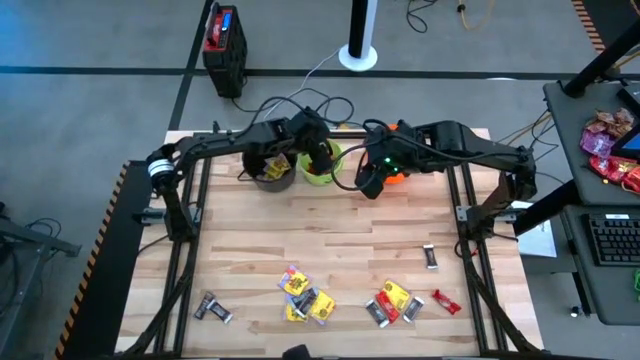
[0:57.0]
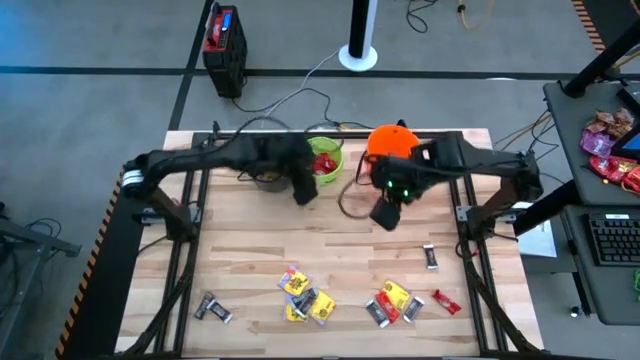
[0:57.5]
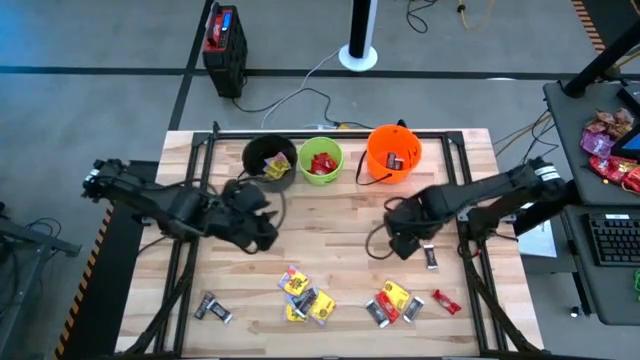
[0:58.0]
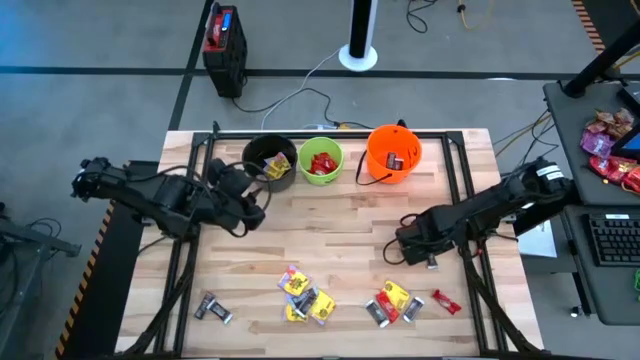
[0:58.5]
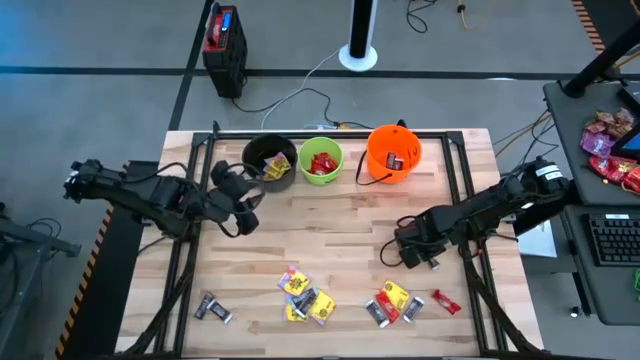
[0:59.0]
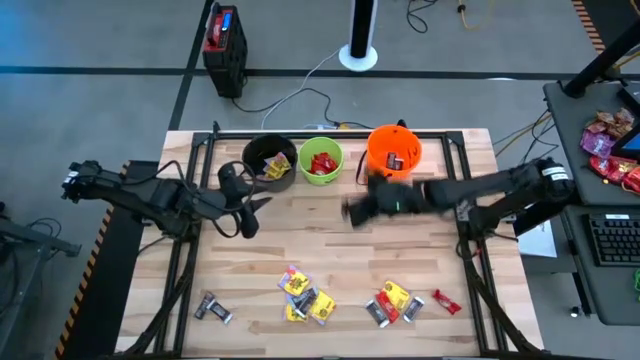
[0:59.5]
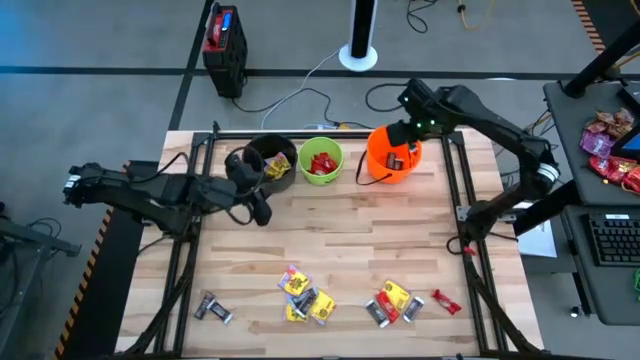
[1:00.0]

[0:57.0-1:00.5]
Task: Sort candy by brand, put in halloween buckets
Put the brown chocolate bar into the orange bucket

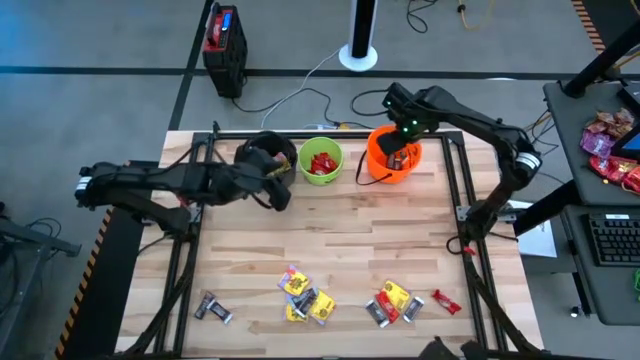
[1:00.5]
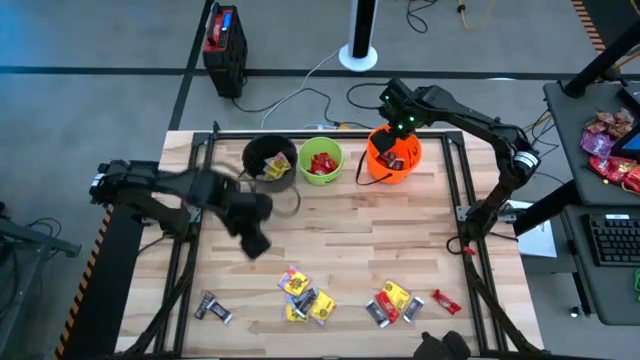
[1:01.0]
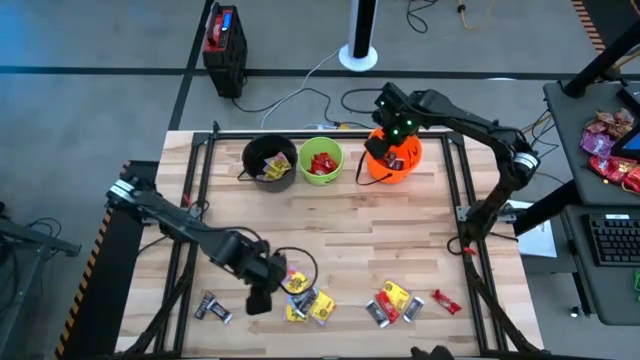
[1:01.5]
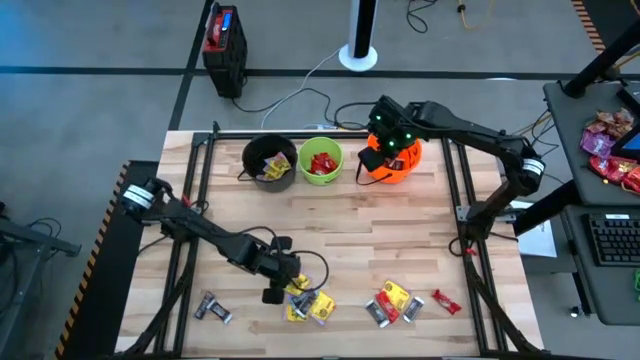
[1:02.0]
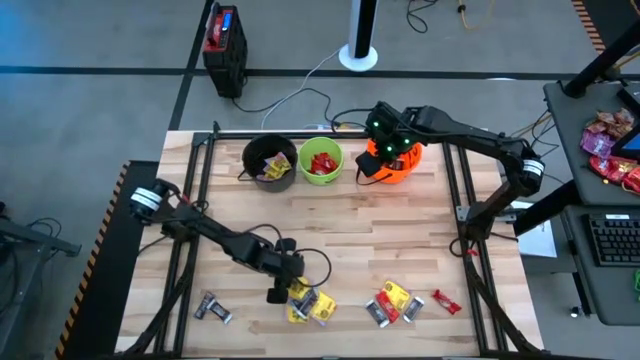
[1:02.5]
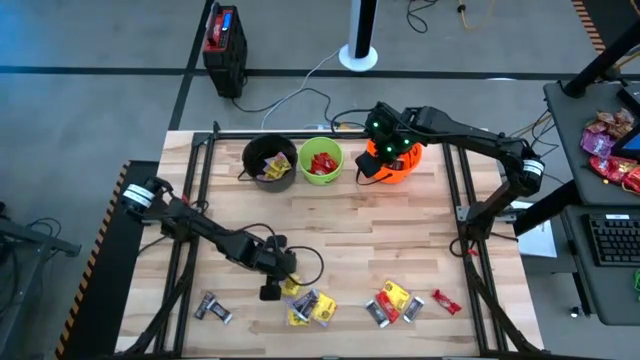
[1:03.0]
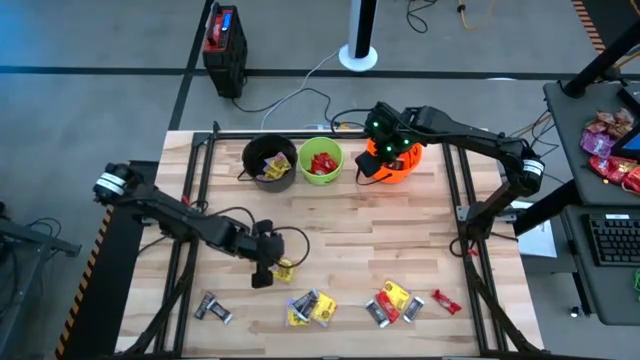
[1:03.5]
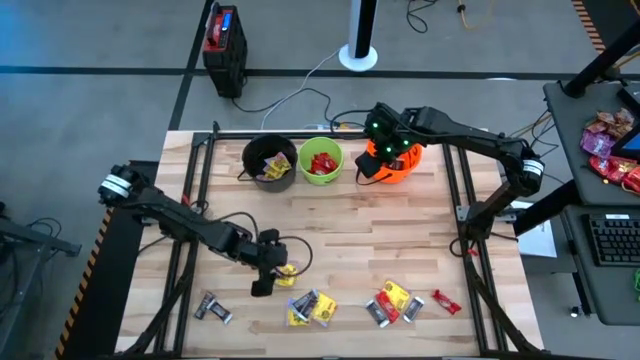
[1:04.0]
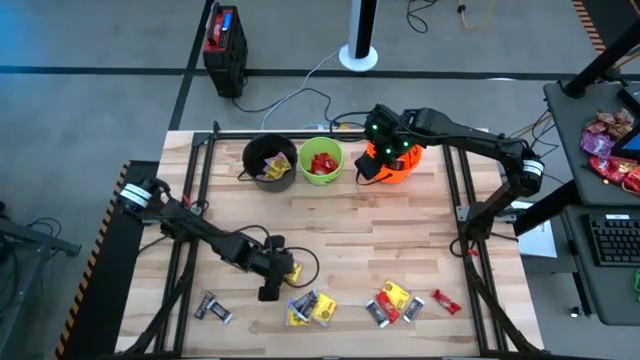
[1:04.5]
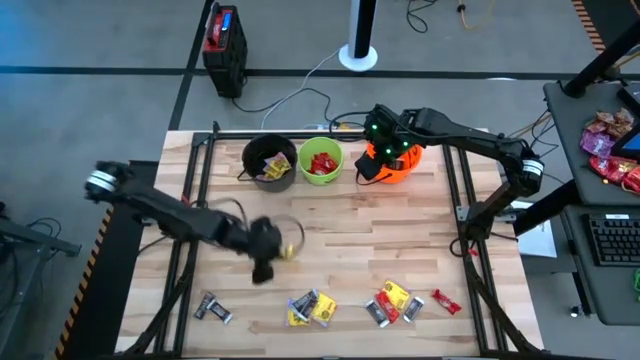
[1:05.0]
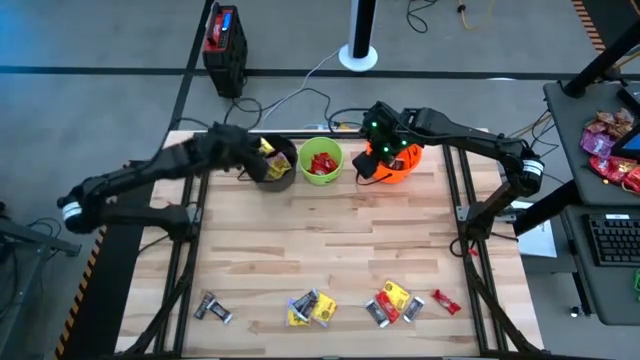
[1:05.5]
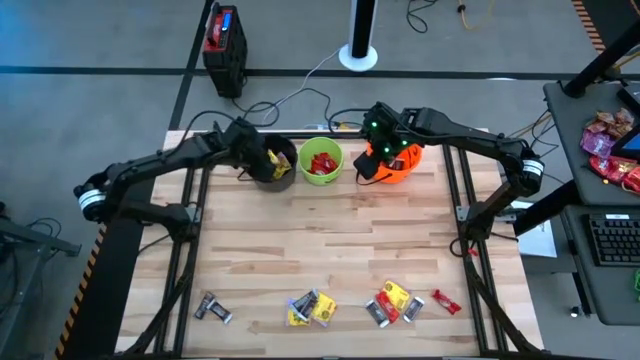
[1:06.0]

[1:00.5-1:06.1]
Put the yellow candy into the black bucket

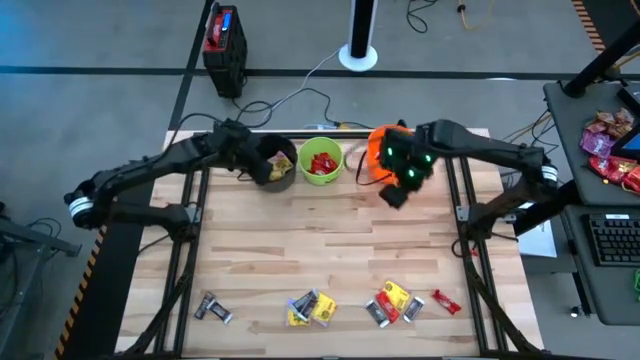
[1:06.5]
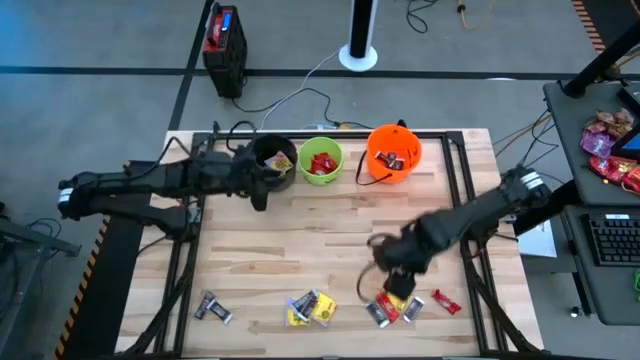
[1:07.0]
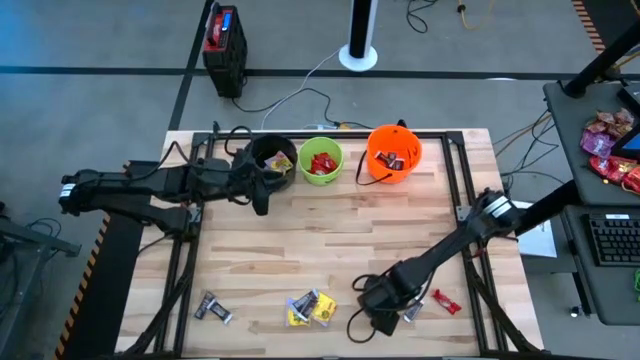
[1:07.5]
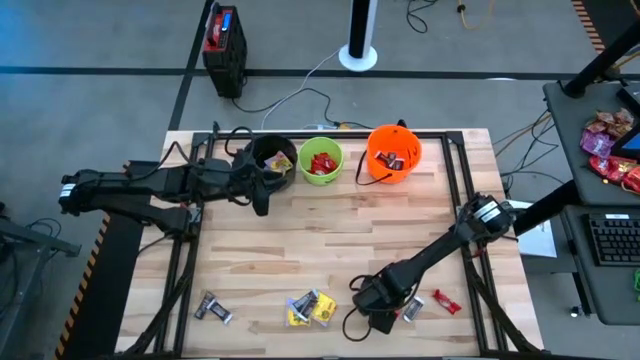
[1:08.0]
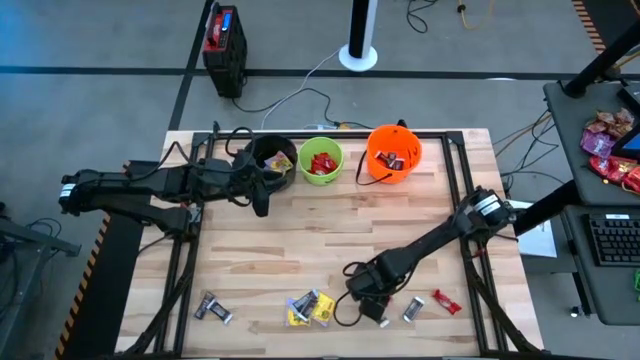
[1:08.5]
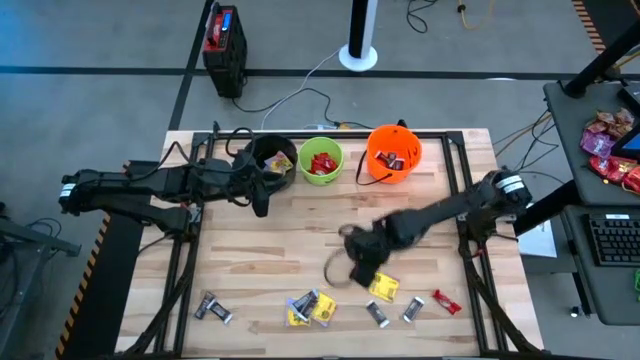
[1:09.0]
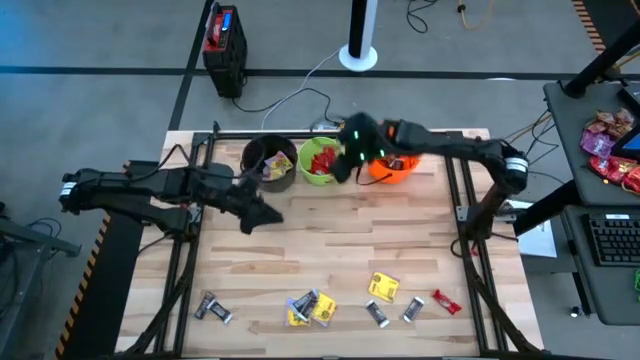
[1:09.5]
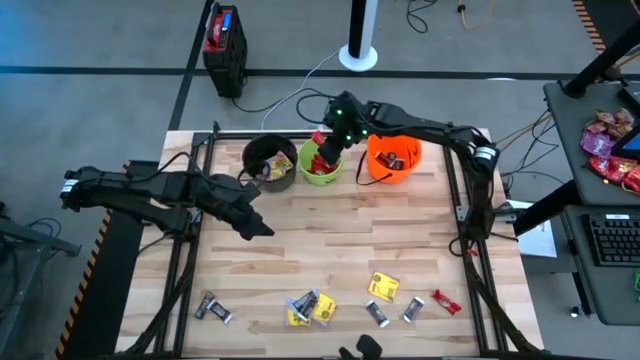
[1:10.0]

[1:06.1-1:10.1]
Put the red chocolate bar into the green bucket

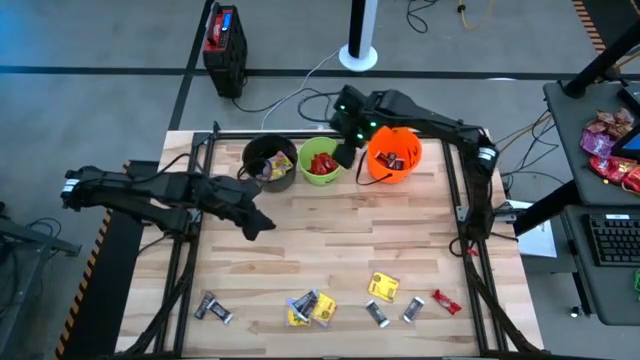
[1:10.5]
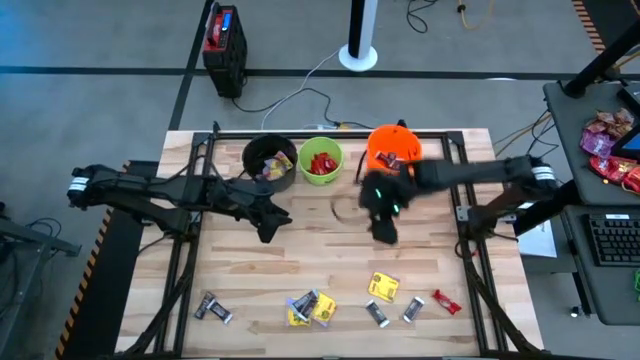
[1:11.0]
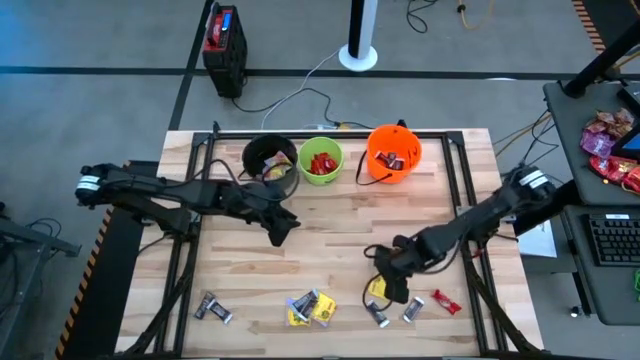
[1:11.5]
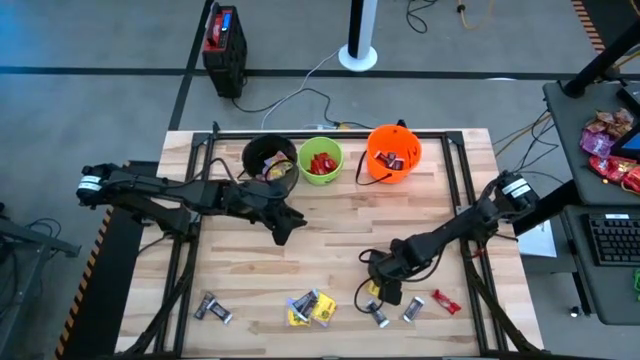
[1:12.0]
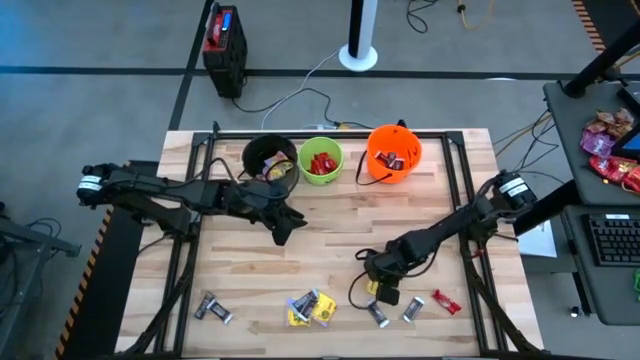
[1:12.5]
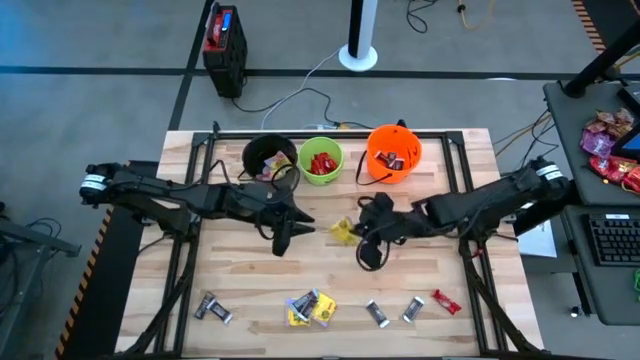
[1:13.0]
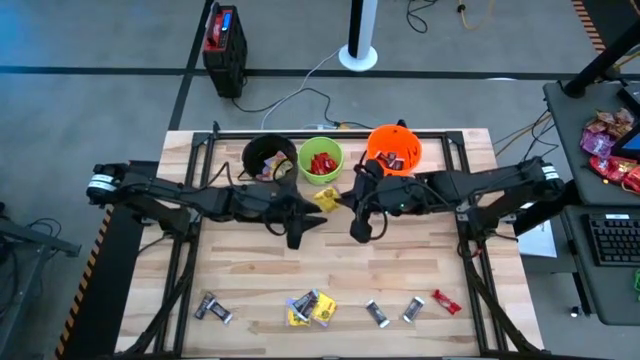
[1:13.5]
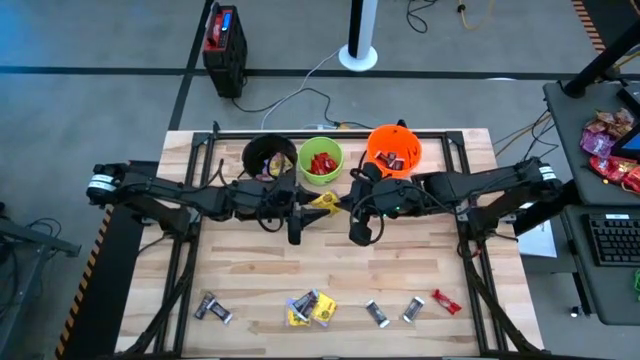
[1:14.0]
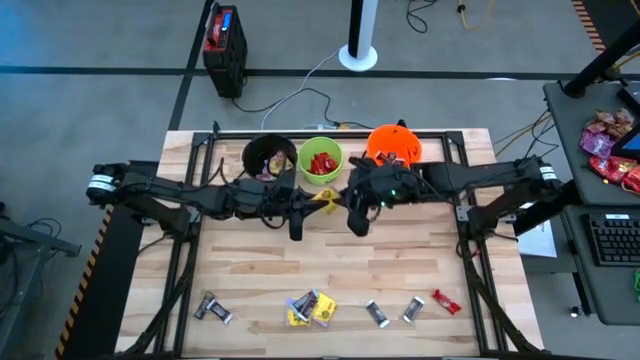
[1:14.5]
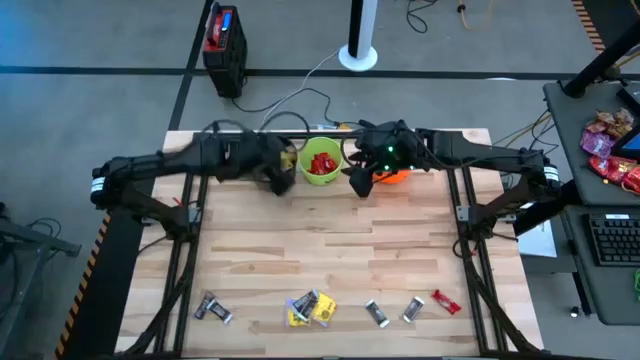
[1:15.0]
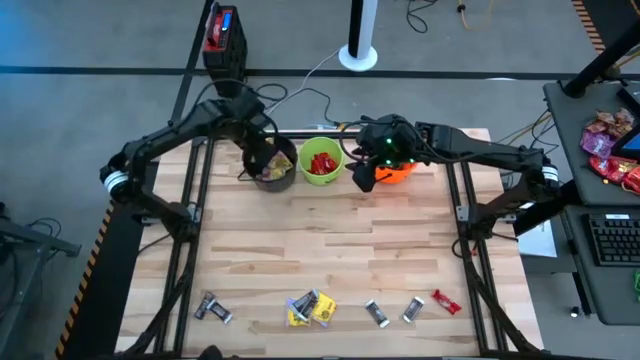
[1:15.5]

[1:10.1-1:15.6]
Put the yellow candy into the black bucket

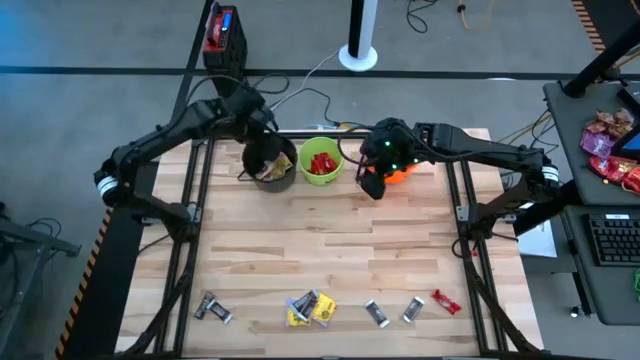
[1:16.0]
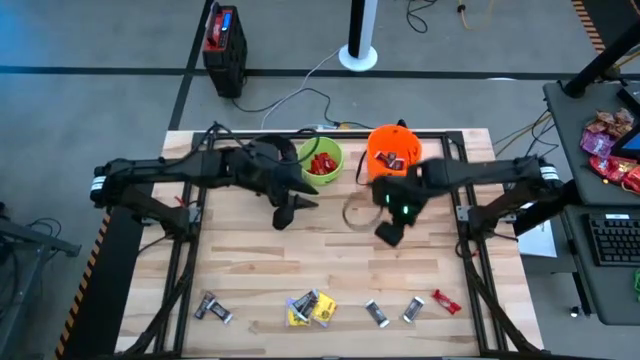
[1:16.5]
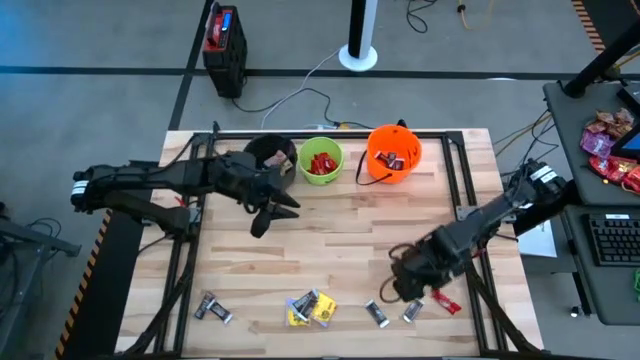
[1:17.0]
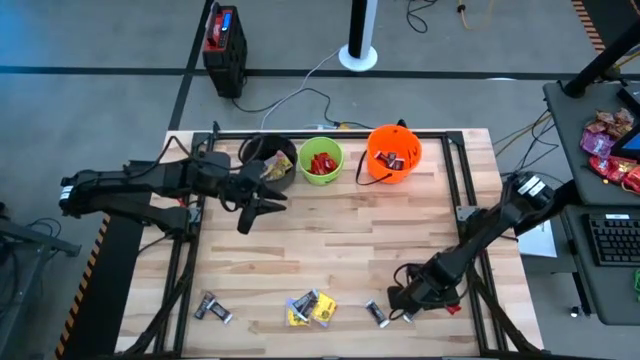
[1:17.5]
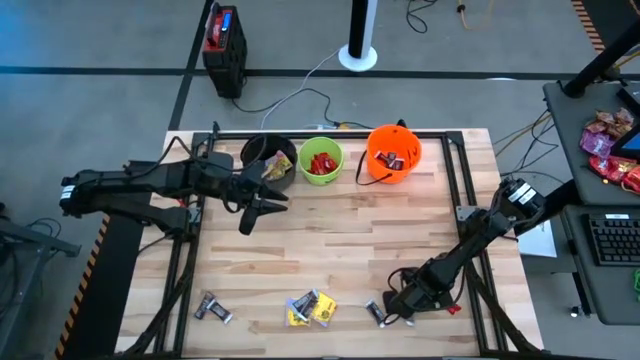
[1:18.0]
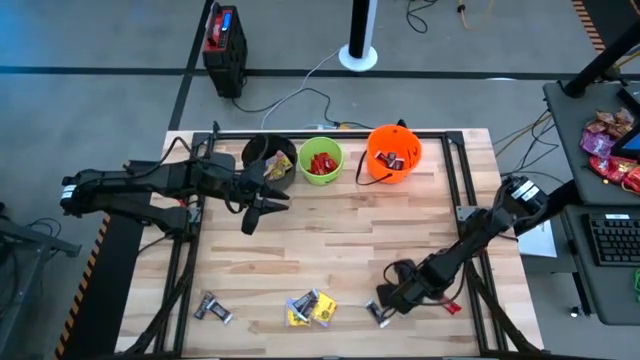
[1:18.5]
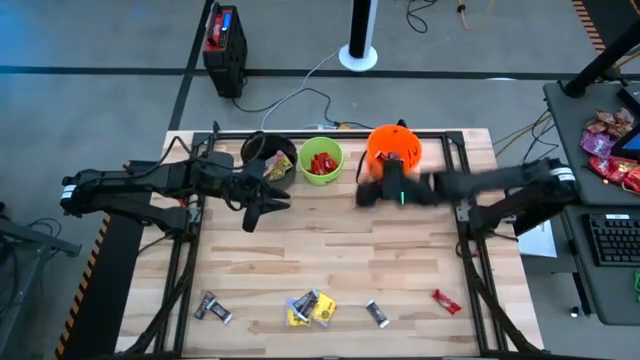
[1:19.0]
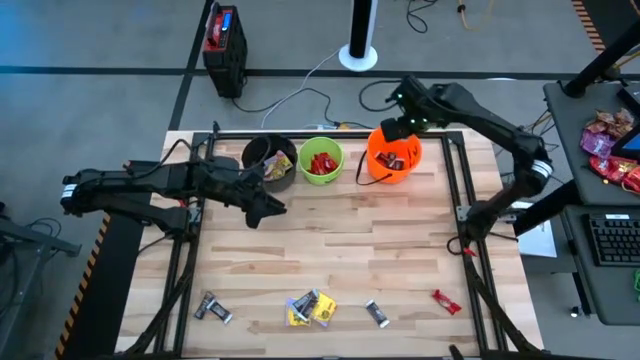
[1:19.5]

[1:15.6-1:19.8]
Put the brown chocolate bar into the orange bucket
